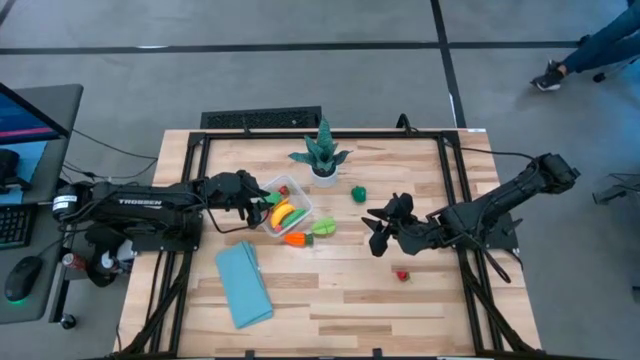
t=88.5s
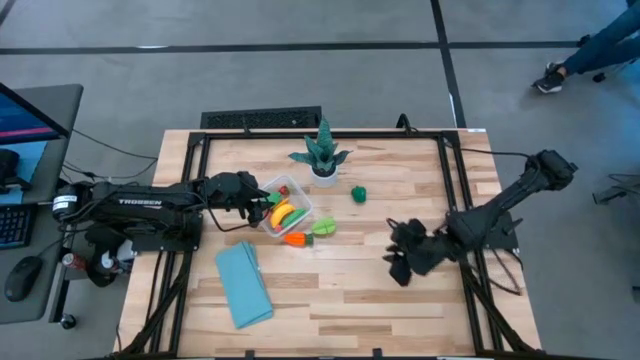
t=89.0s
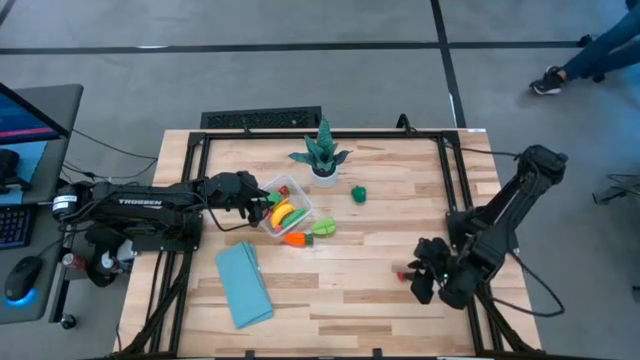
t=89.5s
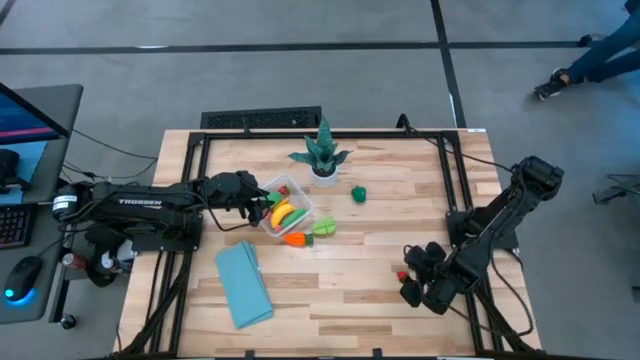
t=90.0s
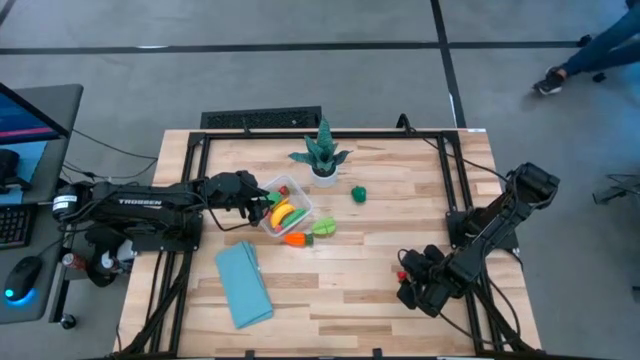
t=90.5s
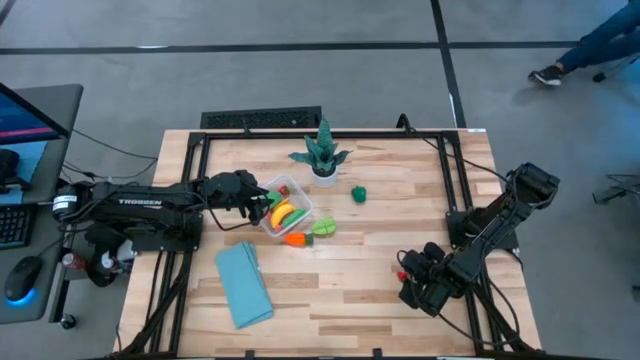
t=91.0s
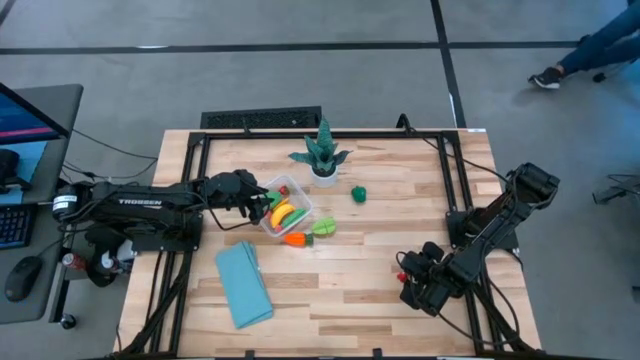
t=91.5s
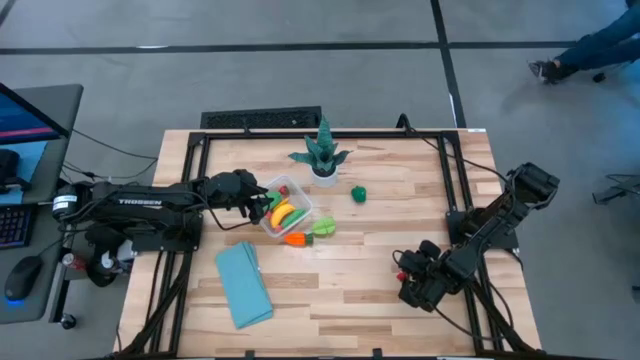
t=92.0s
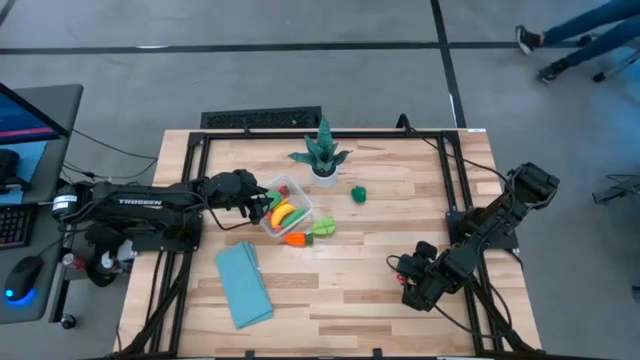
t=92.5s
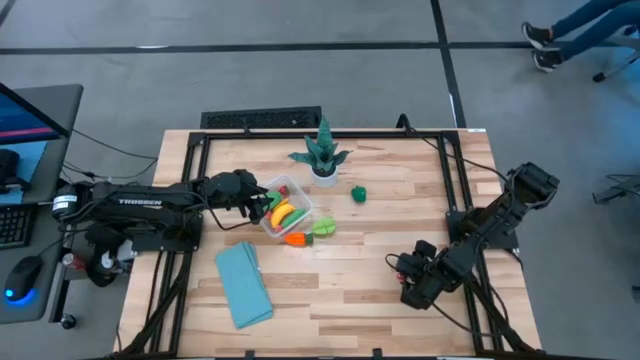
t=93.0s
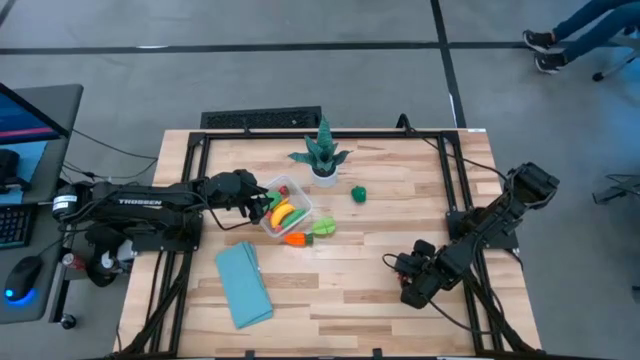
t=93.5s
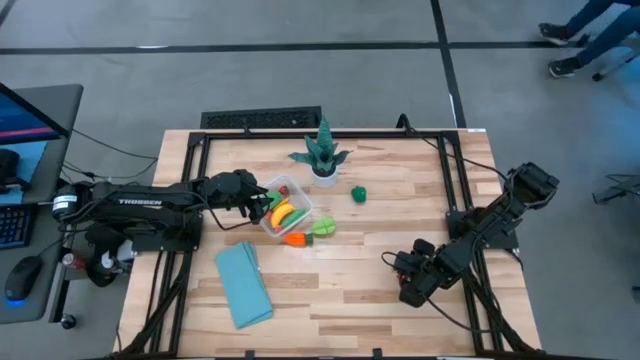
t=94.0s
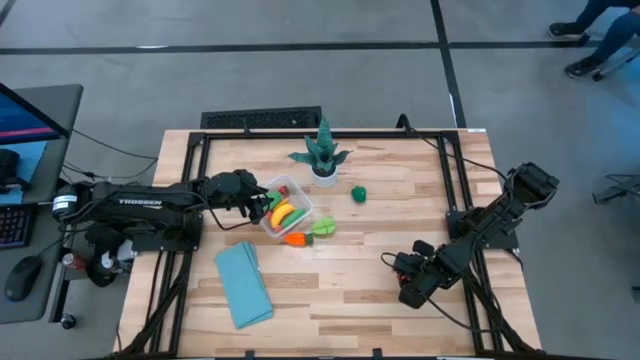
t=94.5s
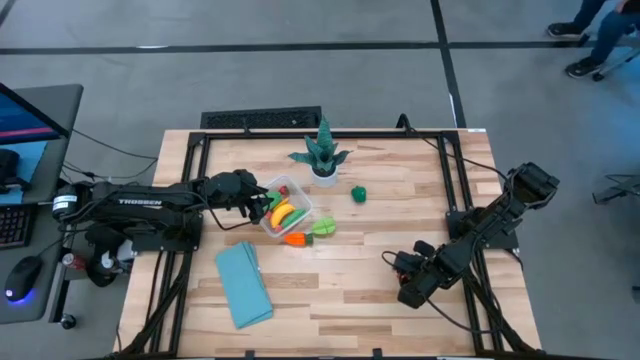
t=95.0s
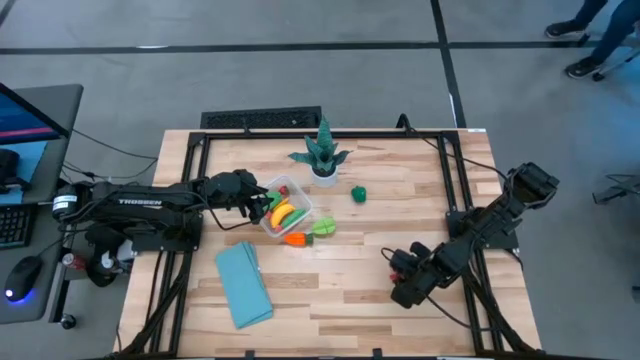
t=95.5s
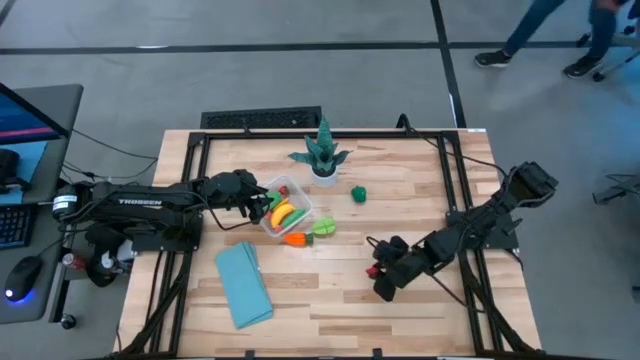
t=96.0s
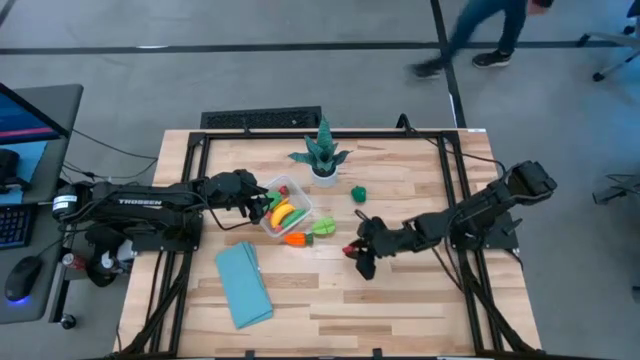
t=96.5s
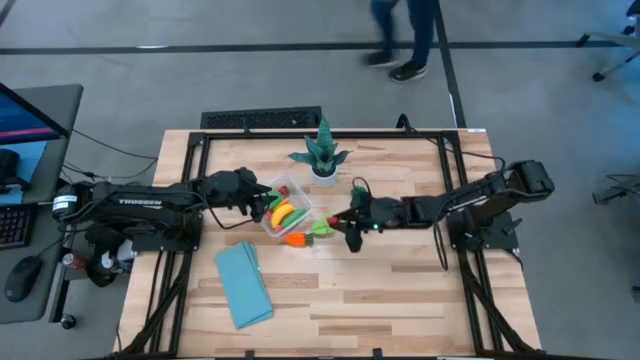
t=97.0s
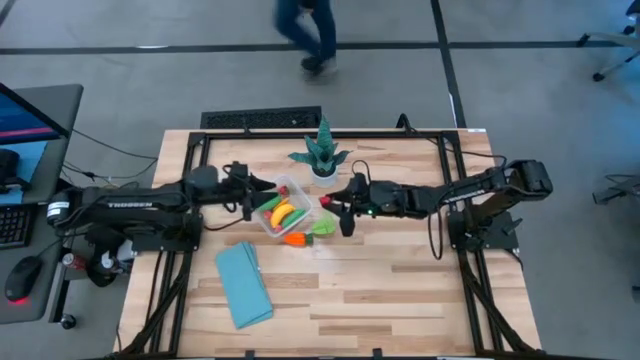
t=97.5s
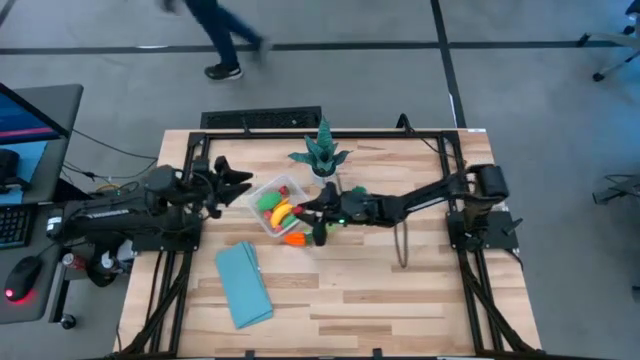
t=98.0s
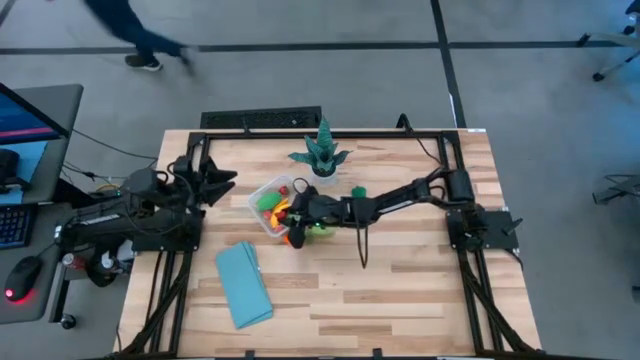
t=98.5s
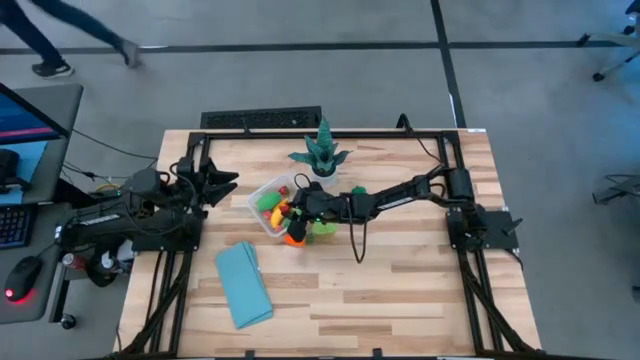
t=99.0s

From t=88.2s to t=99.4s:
Task: Pick and placing Produce into tupperware
Put the red strawberry into the transparent container

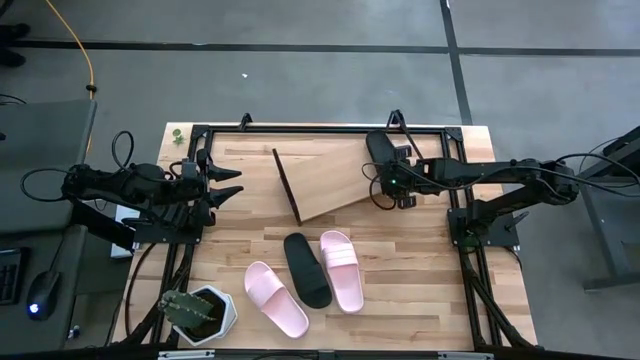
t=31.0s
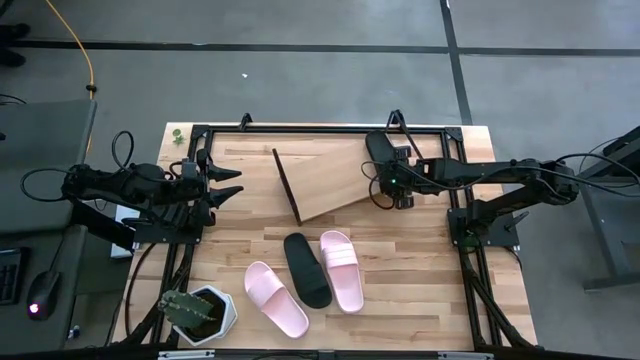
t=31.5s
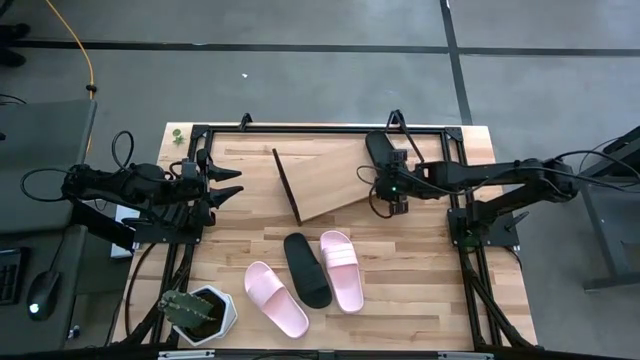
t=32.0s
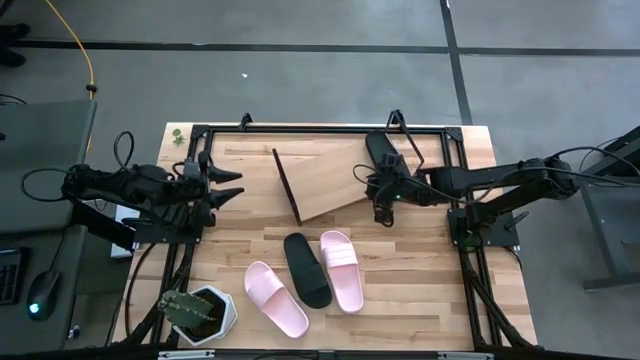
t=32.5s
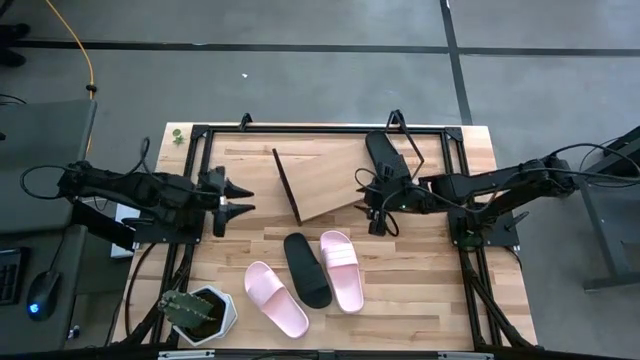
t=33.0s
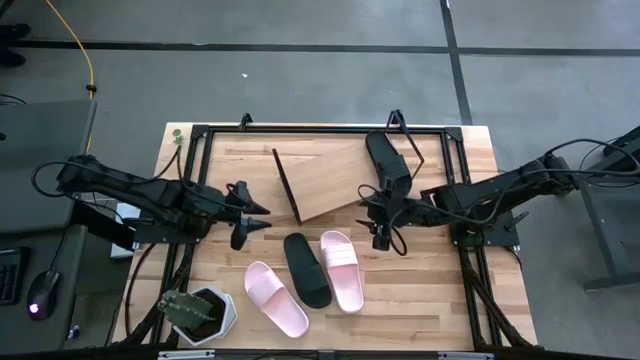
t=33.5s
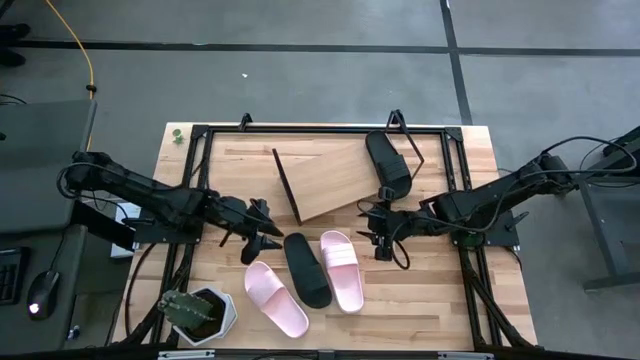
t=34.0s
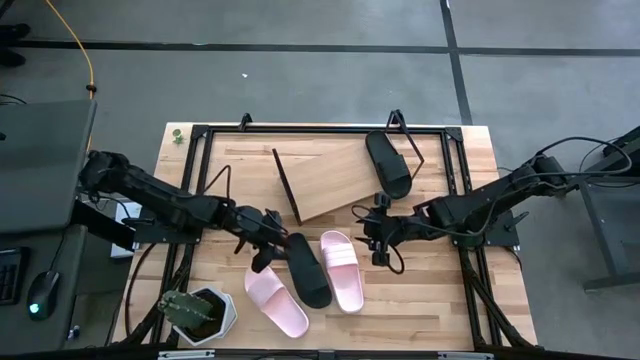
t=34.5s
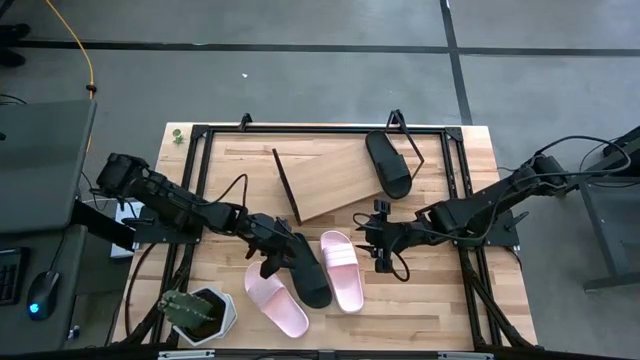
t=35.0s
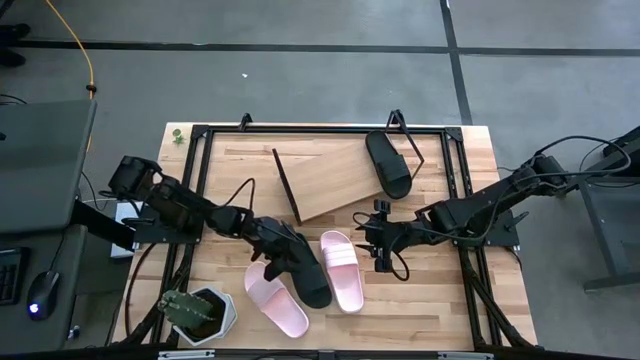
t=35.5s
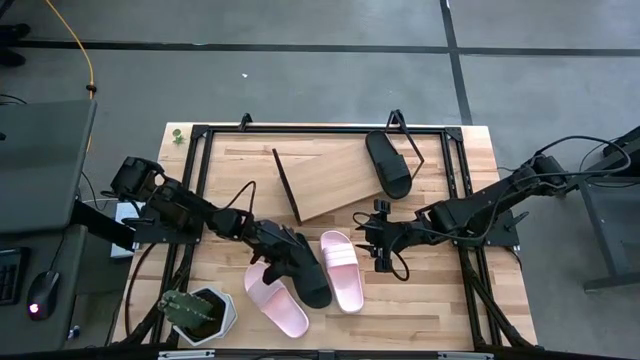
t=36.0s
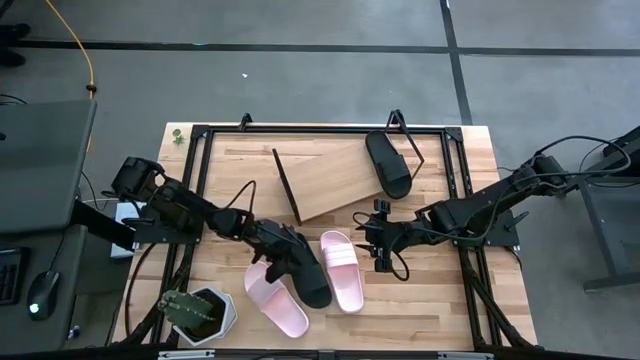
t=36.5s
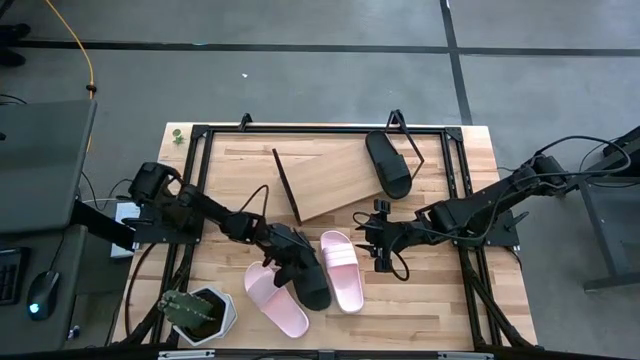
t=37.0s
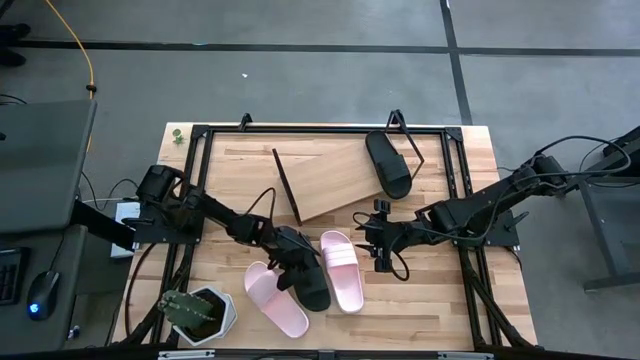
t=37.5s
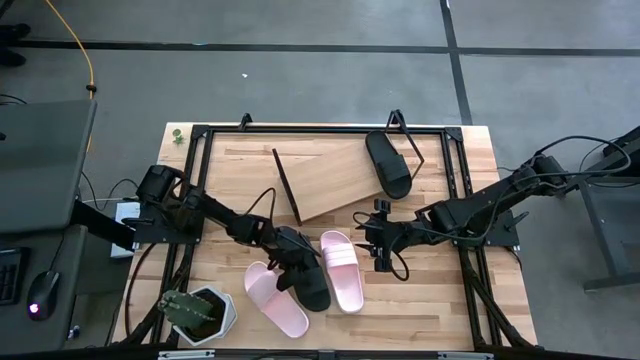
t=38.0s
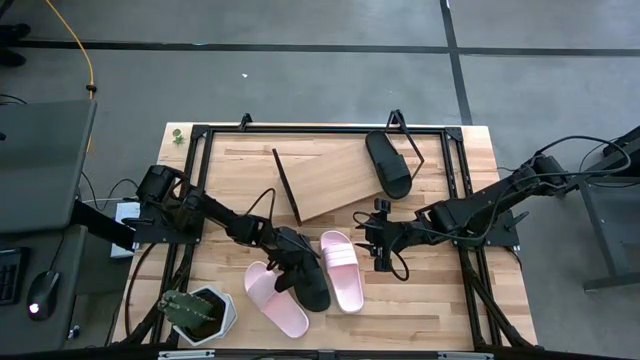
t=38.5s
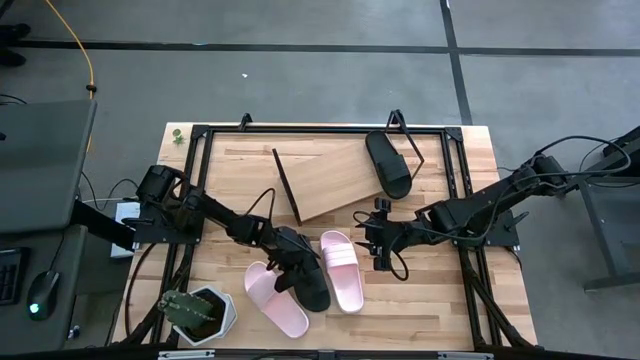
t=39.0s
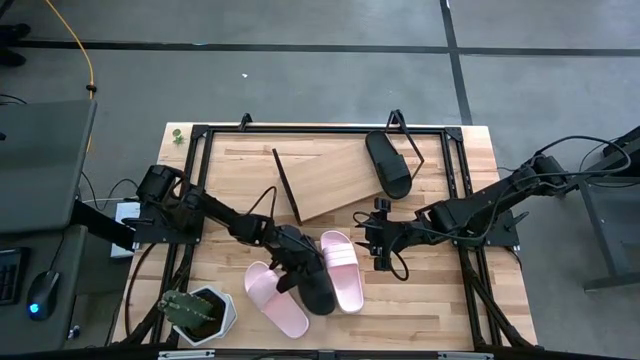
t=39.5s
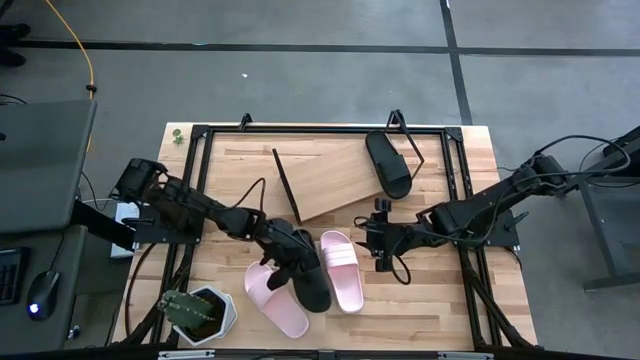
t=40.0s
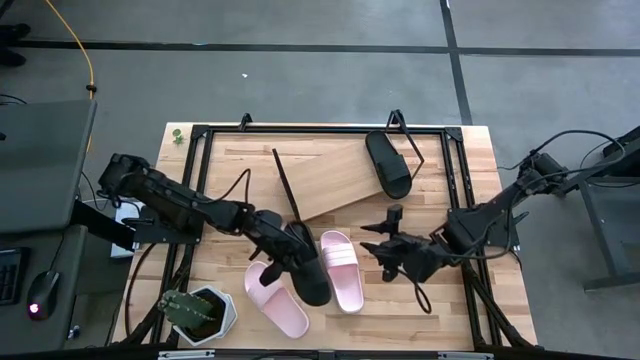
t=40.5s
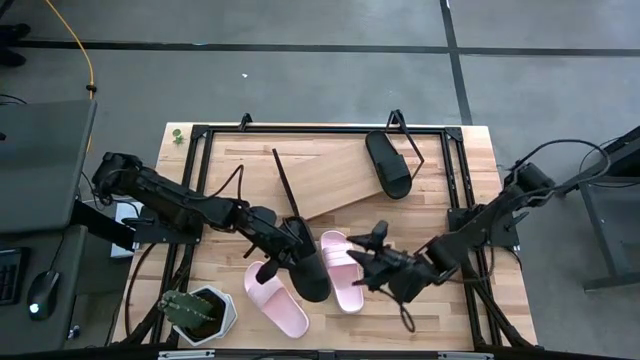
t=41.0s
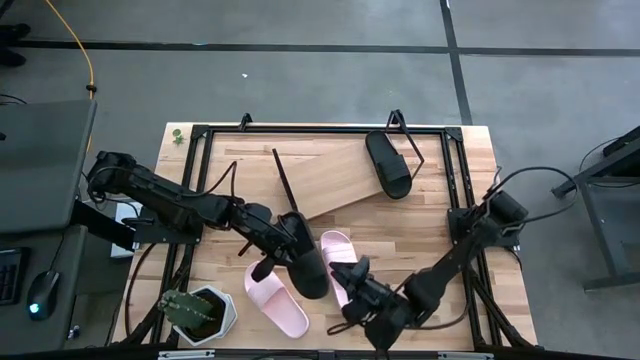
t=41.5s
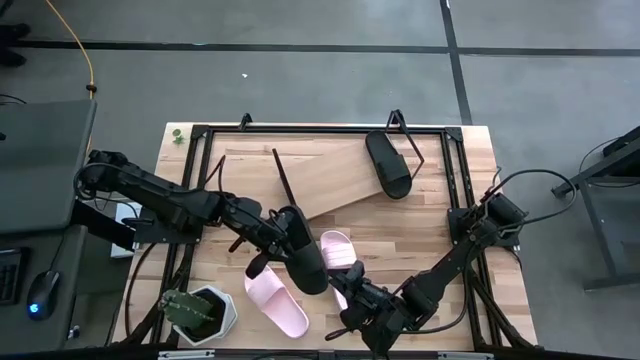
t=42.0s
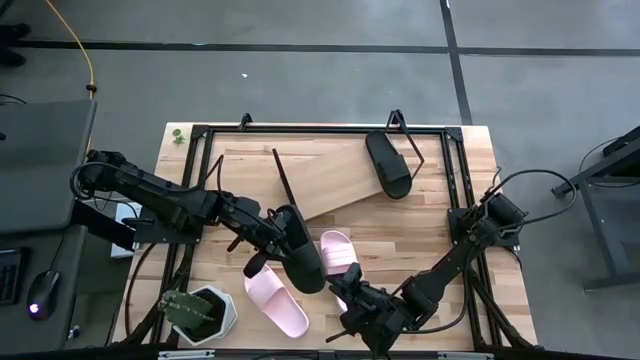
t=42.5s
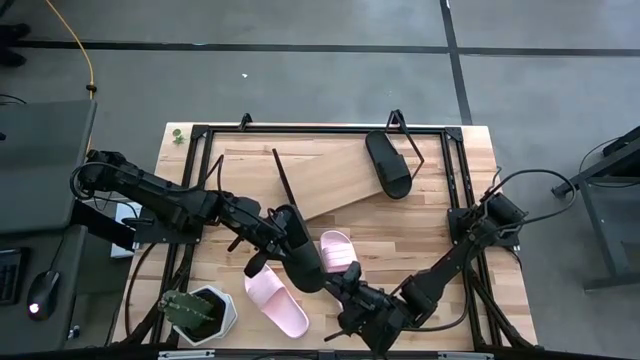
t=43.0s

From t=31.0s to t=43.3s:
Task: Pick and place slides into the shelf
Put the black slipper on the shelf
